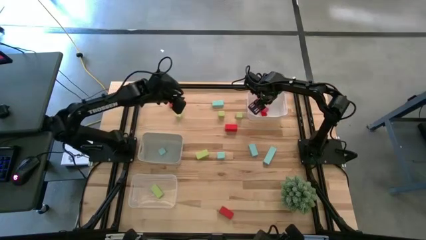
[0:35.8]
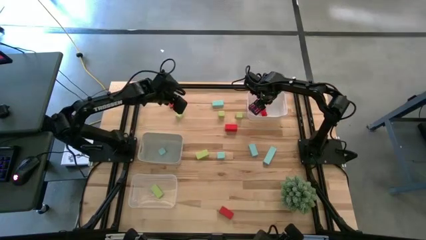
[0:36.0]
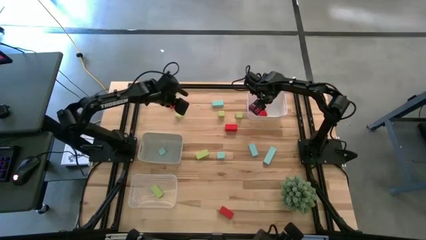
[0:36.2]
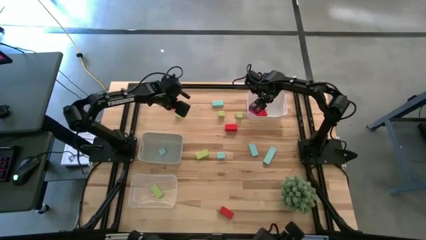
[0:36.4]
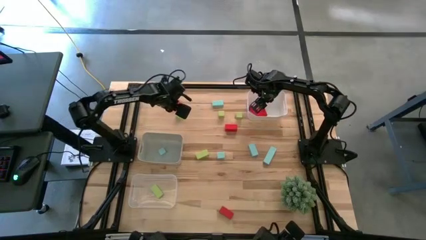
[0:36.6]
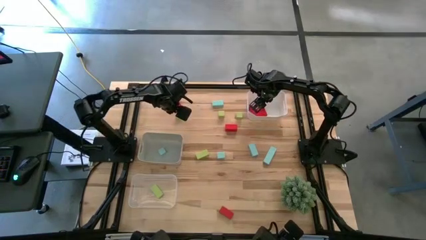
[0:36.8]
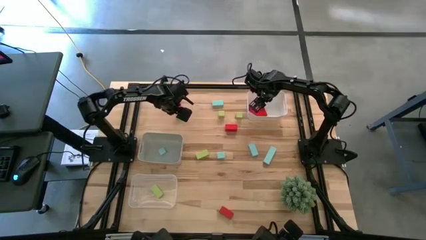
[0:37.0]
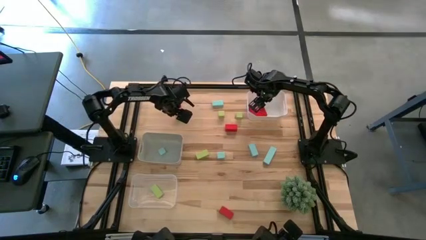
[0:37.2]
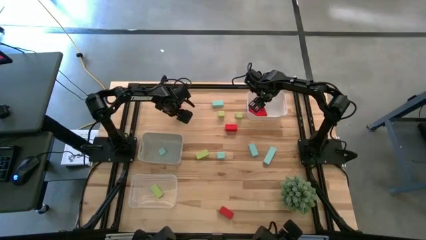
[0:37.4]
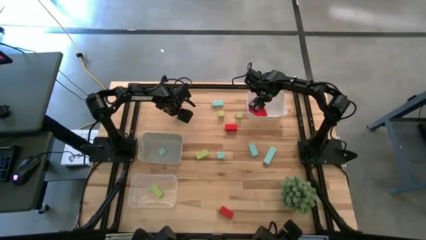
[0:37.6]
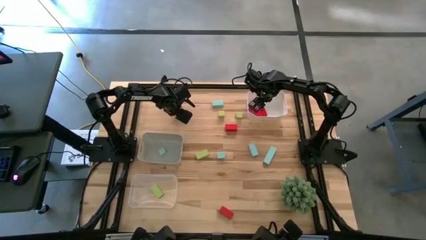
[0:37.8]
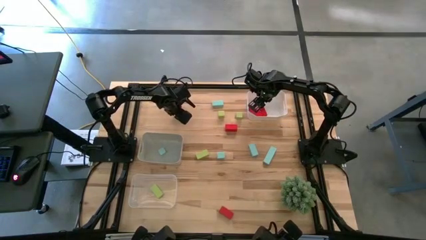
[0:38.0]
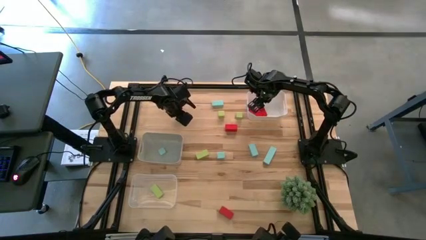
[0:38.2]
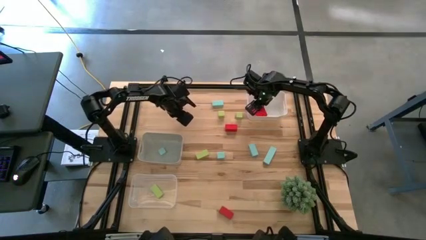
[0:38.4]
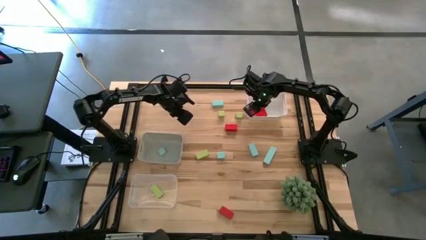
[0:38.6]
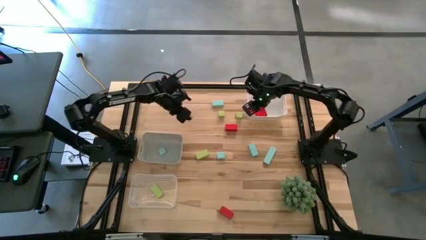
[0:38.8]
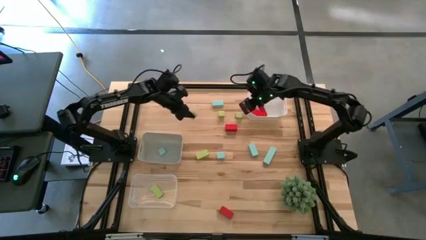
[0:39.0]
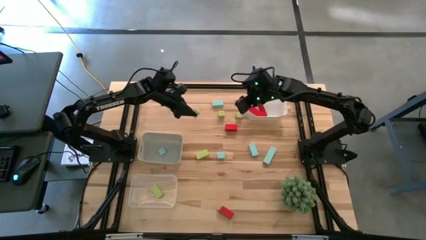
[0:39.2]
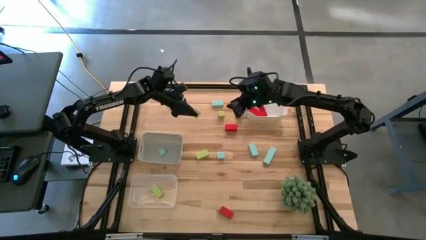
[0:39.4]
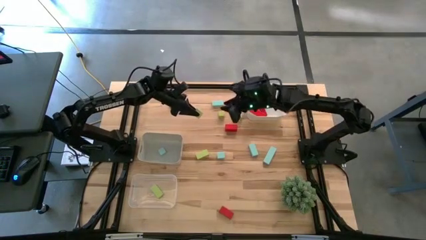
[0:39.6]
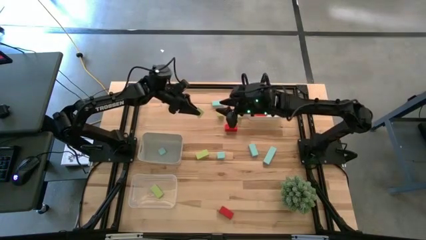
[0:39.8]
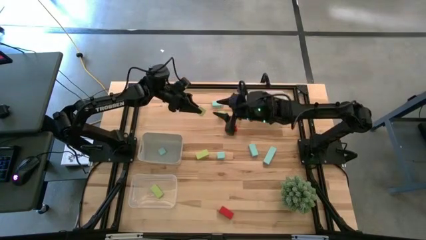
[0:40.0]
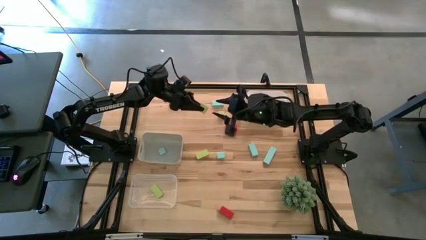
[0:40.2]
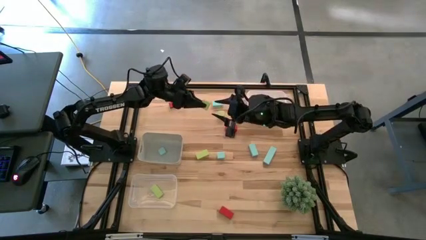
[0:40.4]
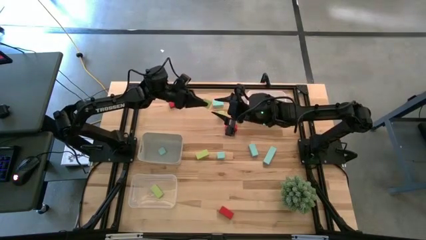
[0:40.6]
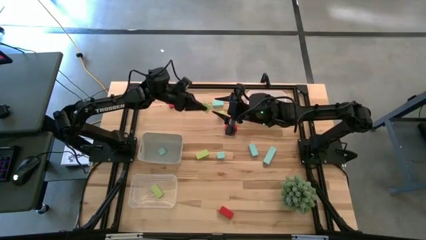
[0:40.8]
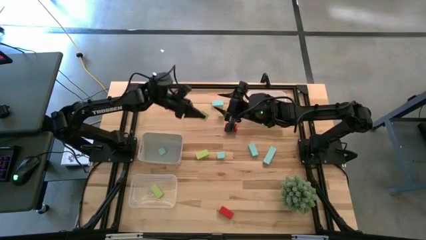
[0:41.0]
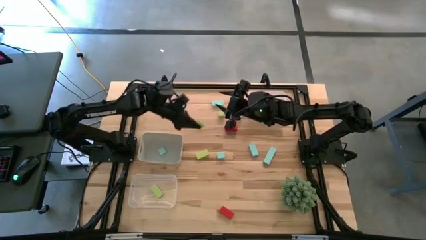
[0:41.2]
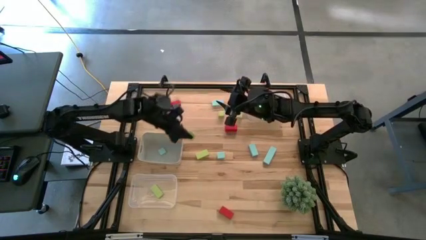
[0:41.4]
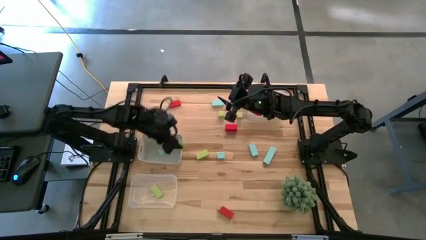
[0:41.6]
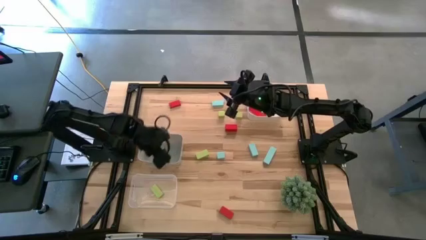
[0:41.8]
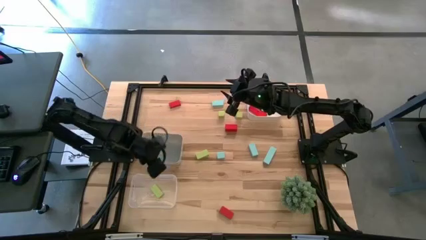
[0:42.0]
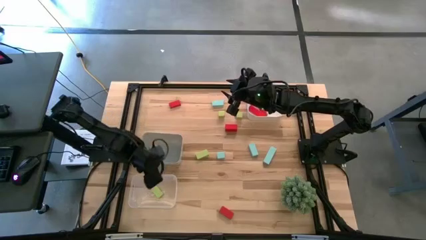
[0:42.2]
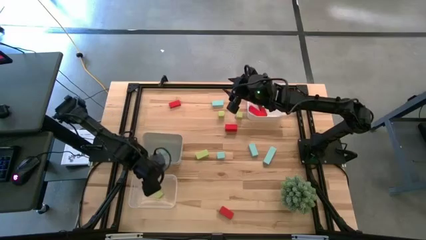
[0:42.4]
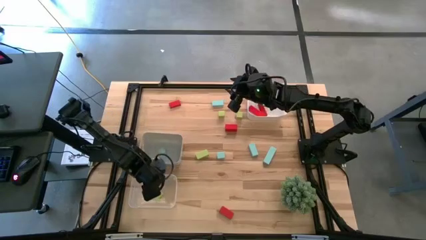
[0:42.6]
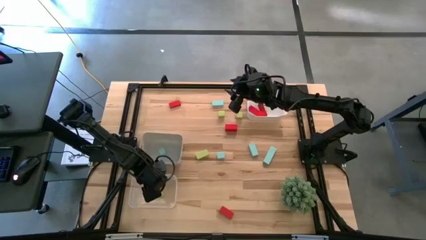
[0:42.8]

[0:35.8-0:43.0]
Task: Sort & place blocks by color
Put the green block into the transparent bin

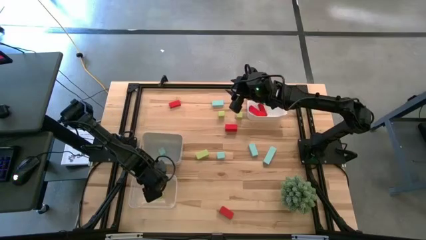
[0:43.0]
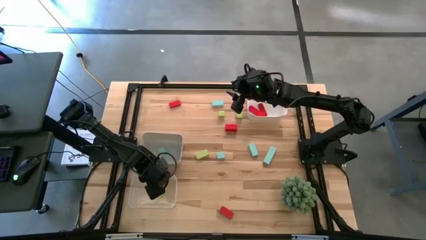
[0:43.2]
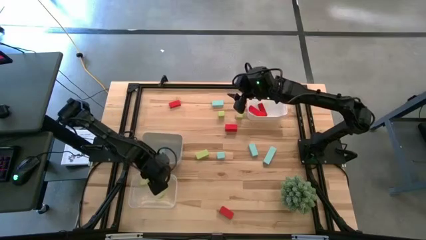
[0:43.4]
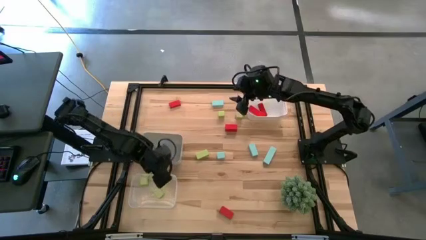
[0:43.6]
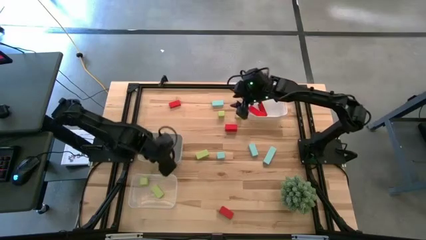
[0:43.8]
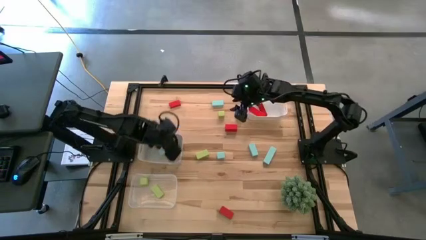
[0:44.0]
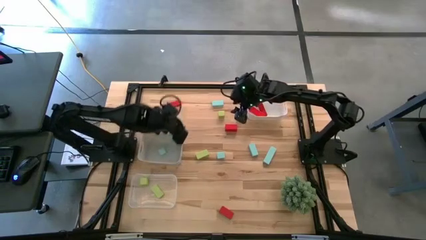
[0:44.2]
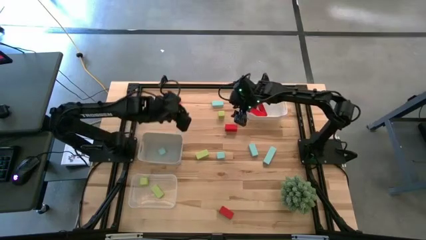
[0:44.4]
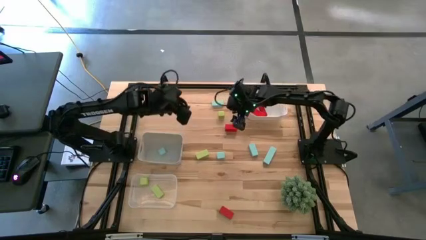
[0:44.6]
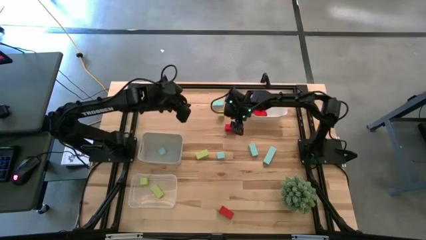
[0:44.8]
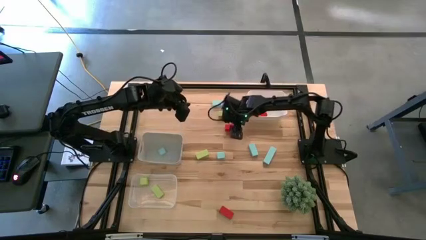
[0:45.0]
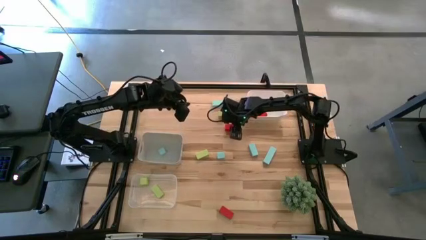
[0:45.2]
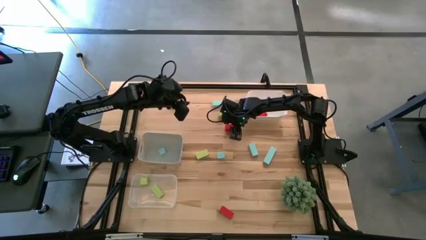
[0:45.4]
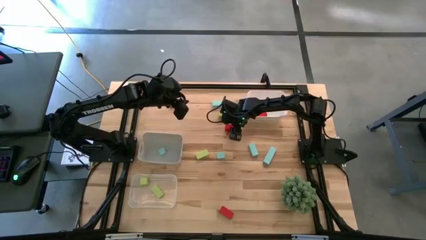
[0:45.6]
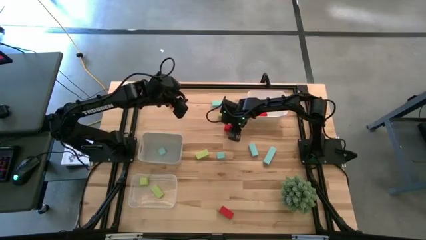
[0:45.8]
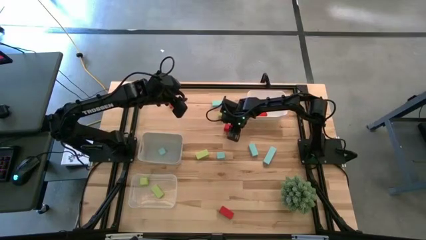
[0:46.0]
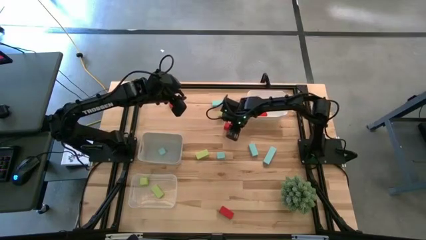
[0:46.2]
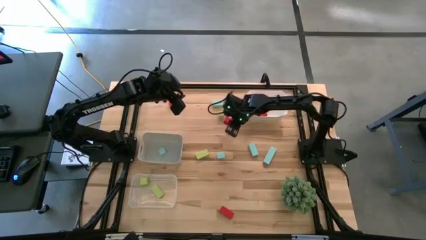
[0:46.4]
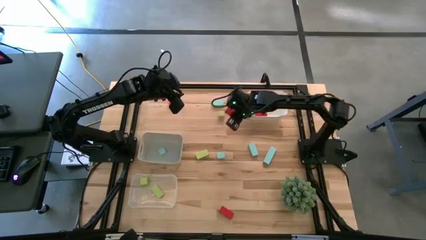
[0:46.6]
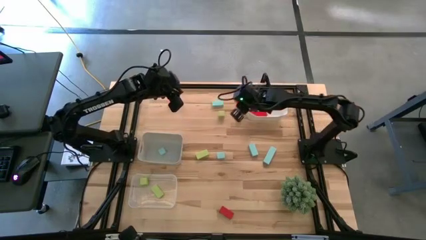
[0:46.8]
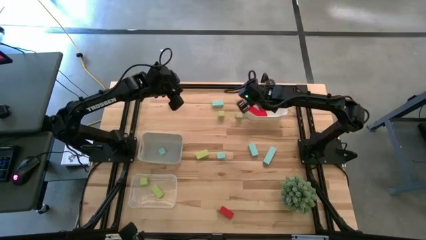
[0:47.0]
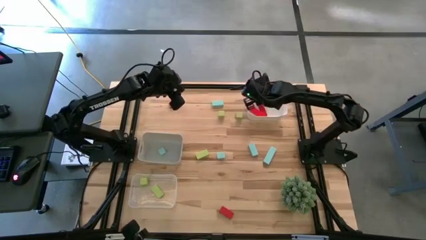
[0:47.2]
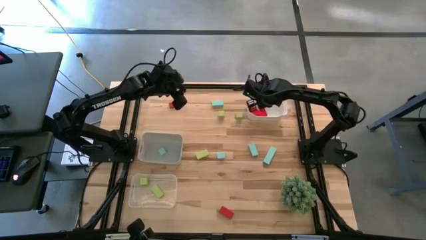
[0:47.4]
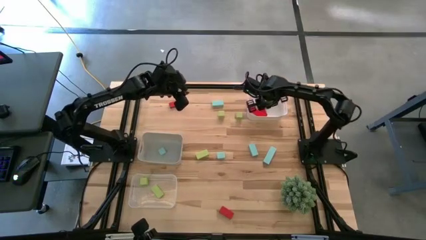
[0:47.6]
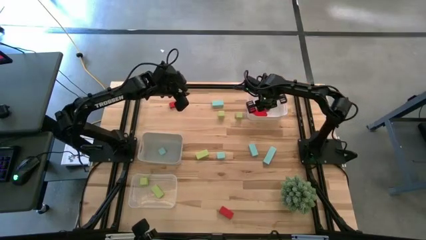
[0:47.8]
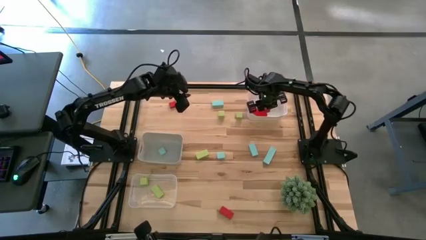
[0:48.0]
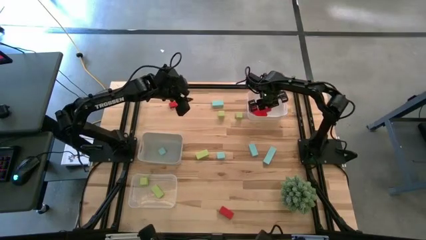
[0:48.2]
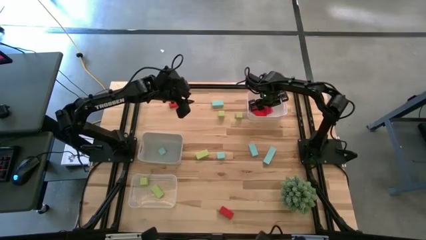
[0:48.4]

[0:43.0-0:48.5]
Put the red block into the white bin

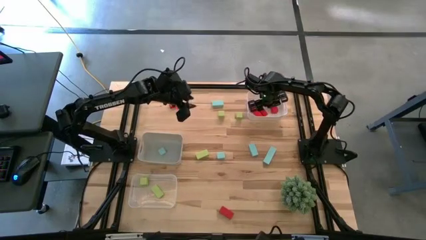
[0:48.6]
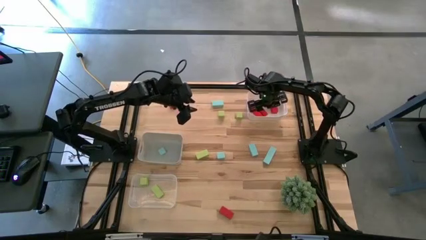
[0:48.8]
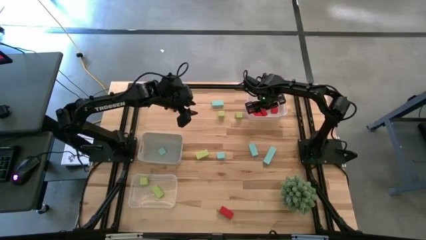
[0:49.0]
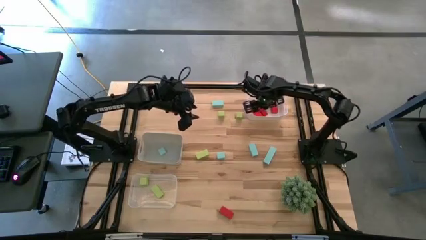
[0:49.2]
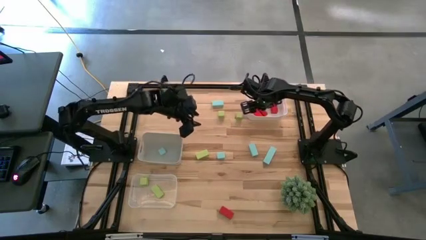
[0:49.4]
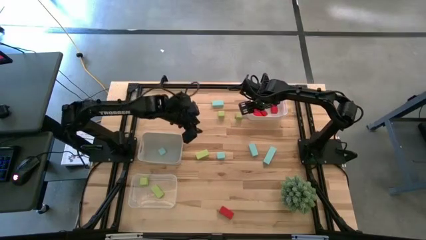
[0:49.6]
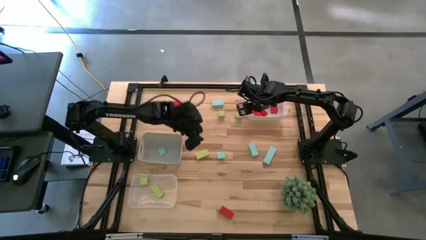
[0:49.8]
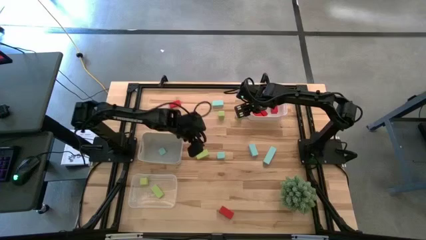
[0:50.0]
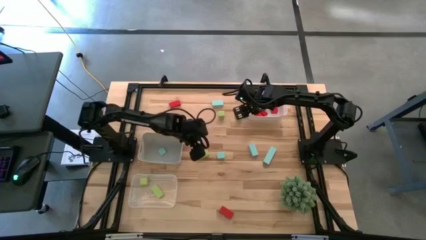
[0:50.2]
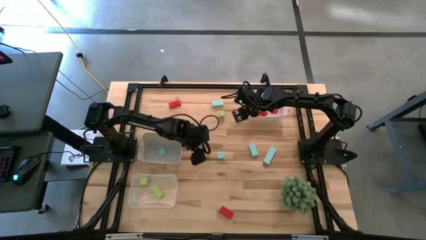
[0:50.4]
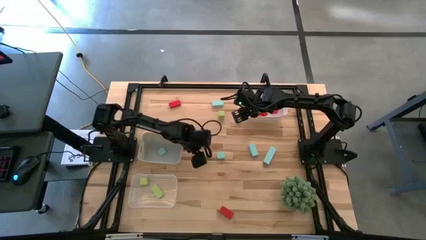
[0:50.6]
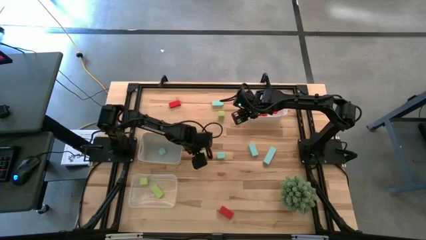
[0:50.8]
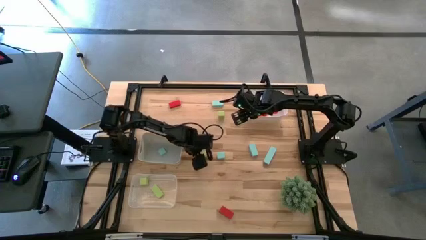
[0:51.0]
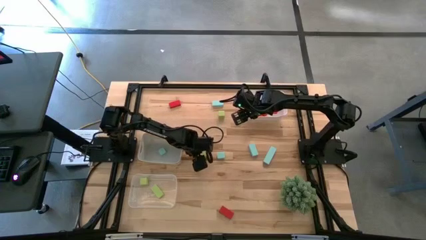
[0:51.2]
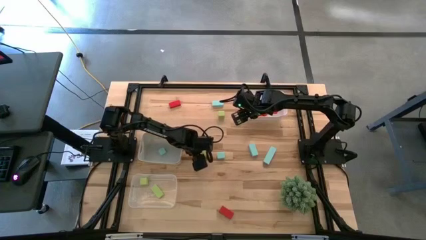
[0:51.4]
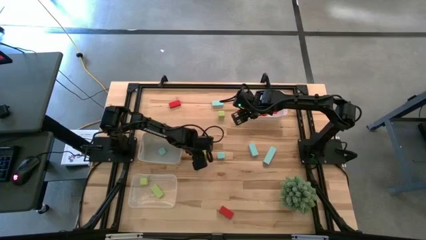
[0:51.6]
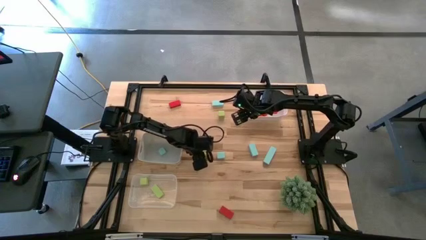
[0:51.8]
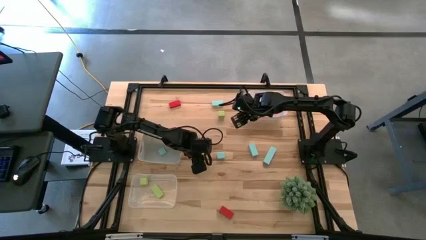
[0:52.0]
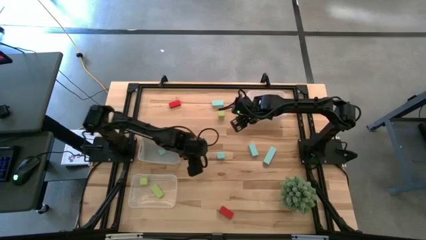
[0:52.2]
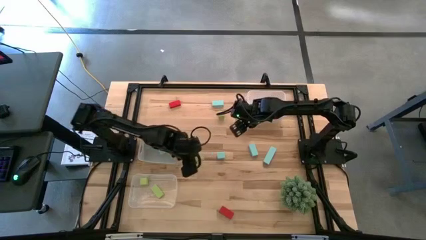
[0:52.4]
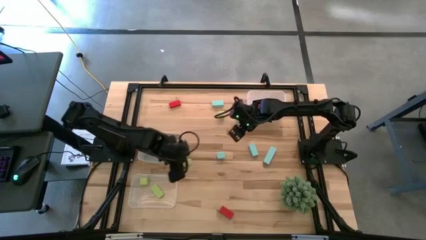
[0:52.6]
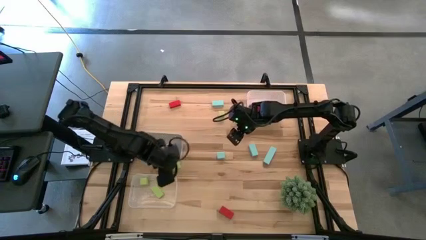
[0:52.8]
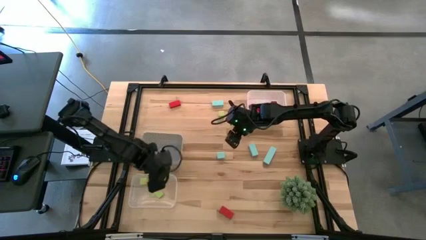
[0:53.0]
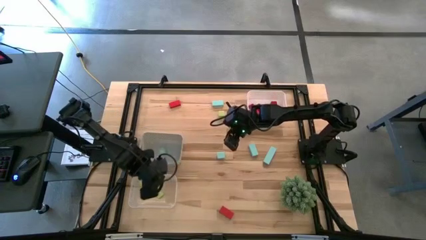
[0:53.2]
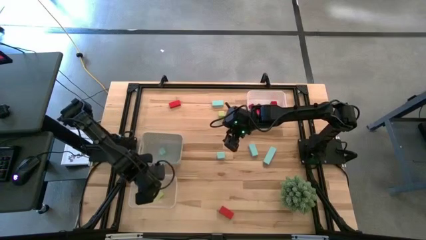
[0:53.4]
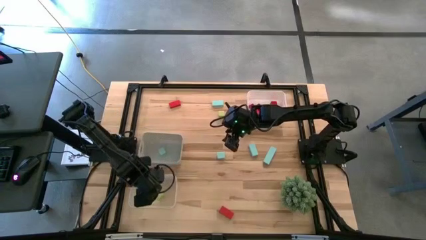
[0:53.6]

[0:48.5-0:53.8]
Put the green block into the transparent bin
